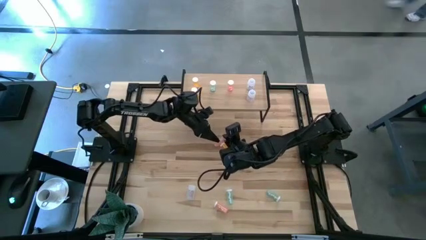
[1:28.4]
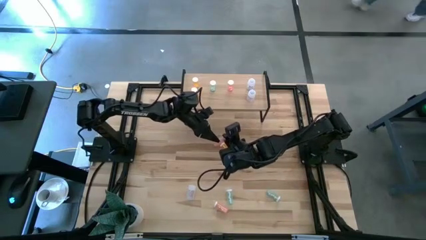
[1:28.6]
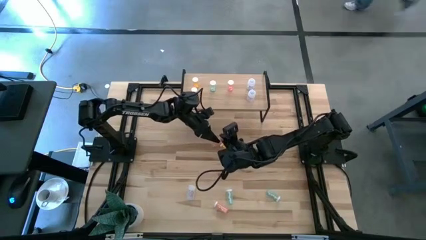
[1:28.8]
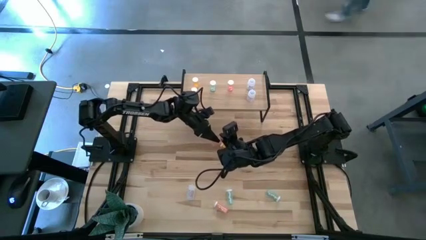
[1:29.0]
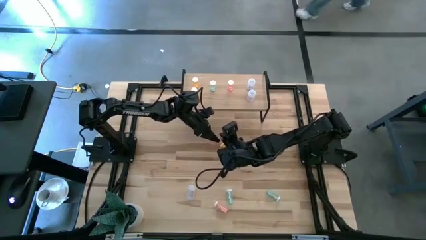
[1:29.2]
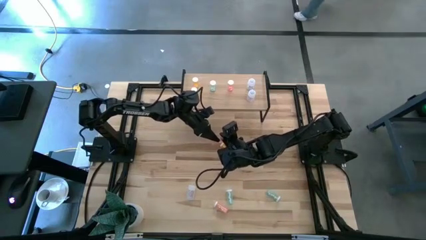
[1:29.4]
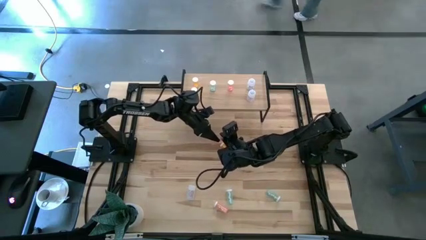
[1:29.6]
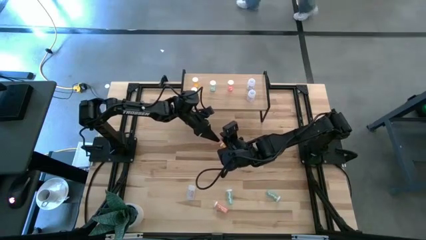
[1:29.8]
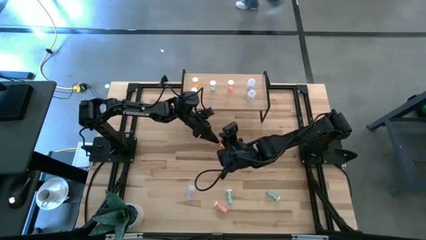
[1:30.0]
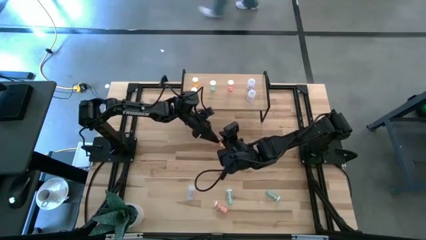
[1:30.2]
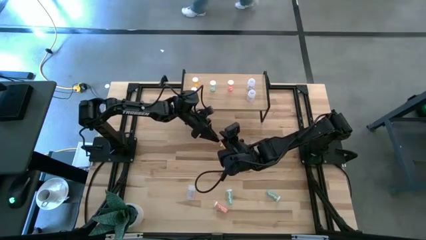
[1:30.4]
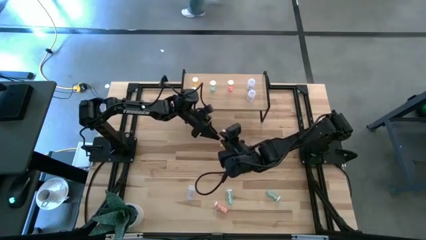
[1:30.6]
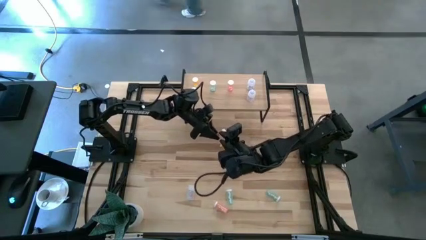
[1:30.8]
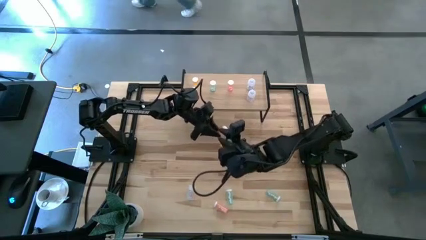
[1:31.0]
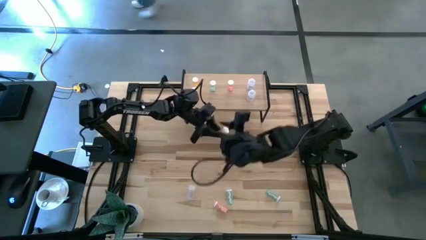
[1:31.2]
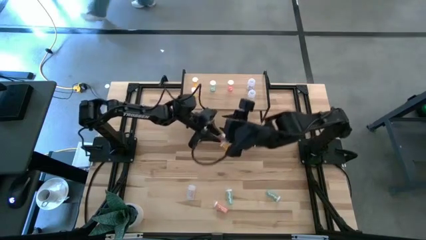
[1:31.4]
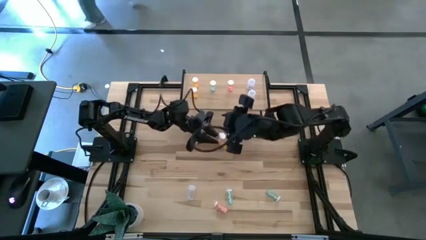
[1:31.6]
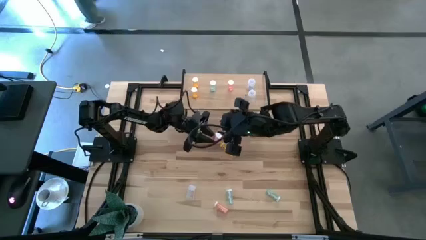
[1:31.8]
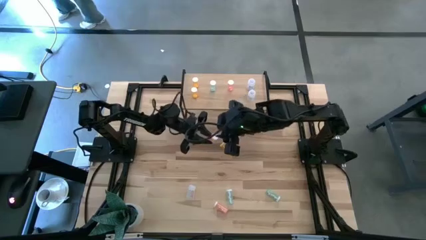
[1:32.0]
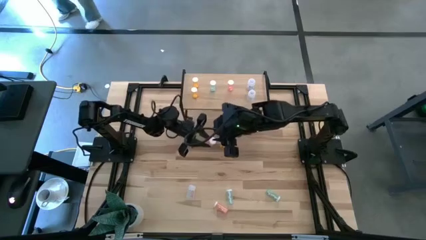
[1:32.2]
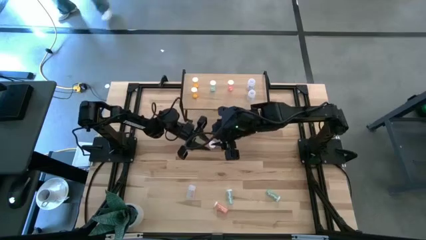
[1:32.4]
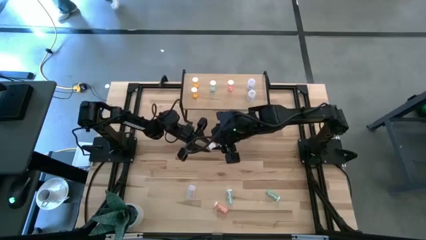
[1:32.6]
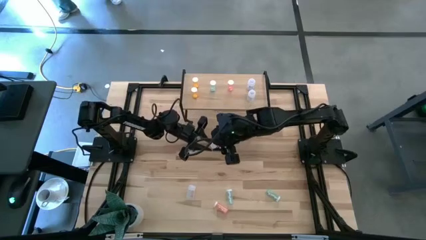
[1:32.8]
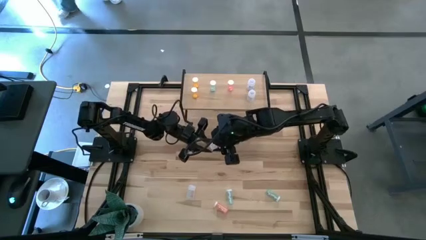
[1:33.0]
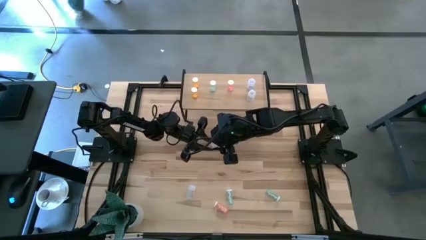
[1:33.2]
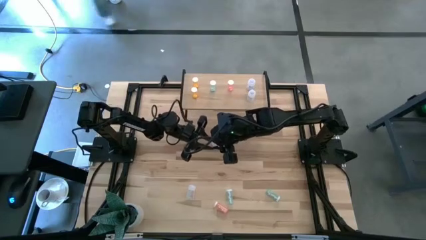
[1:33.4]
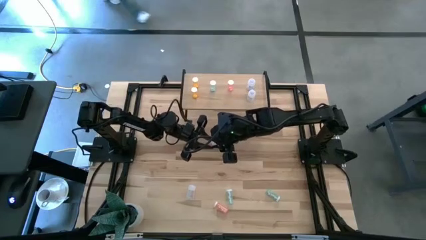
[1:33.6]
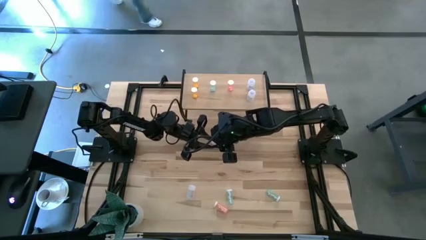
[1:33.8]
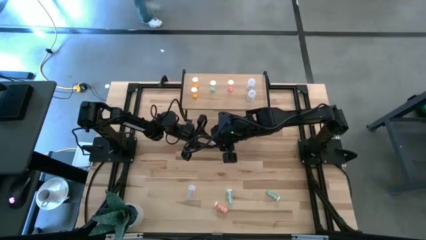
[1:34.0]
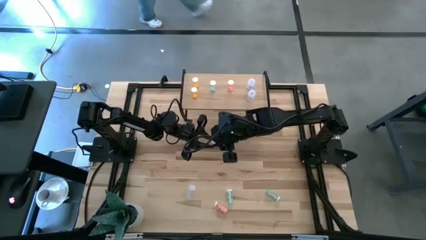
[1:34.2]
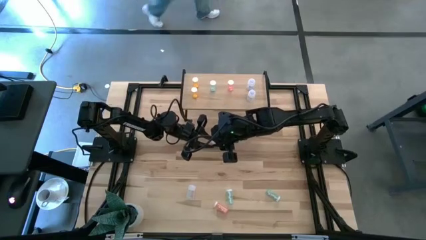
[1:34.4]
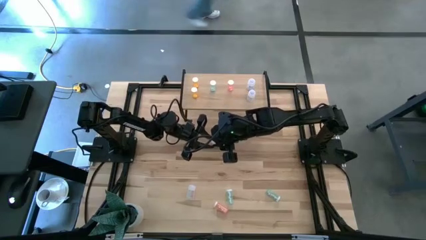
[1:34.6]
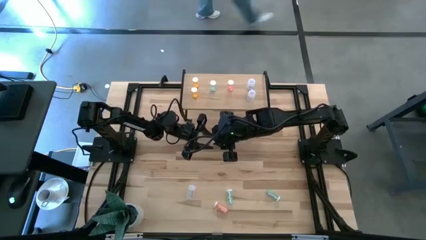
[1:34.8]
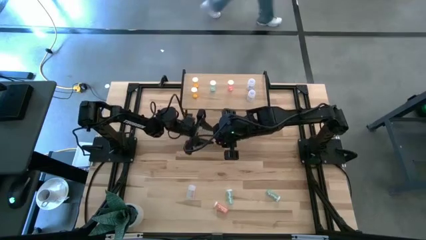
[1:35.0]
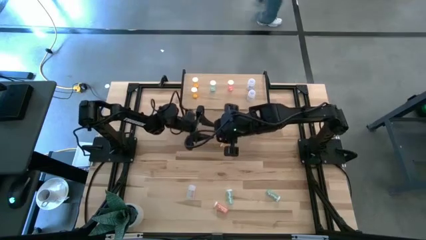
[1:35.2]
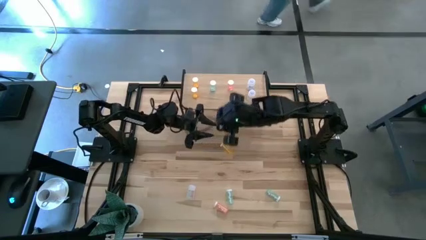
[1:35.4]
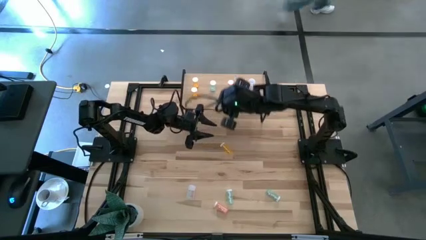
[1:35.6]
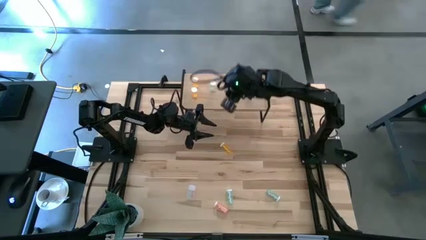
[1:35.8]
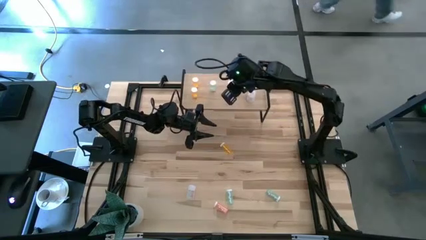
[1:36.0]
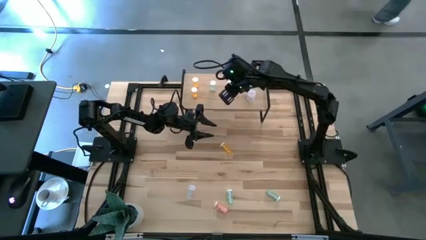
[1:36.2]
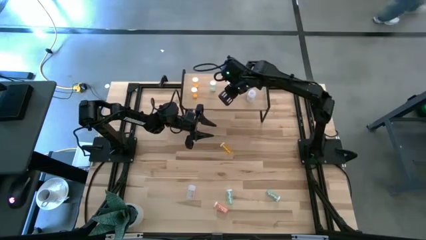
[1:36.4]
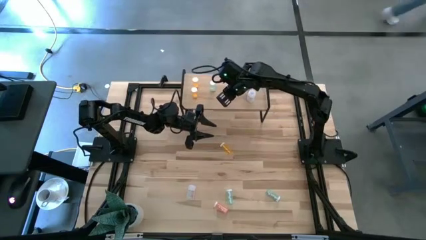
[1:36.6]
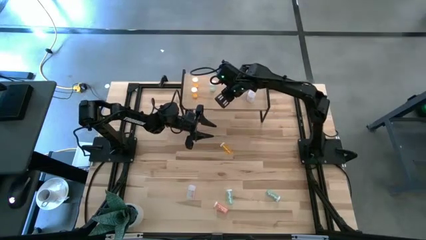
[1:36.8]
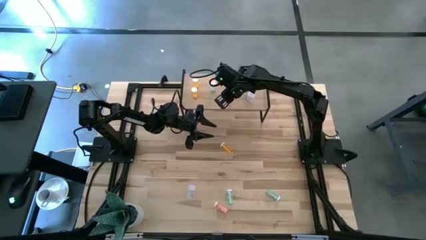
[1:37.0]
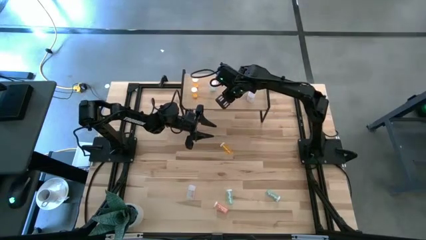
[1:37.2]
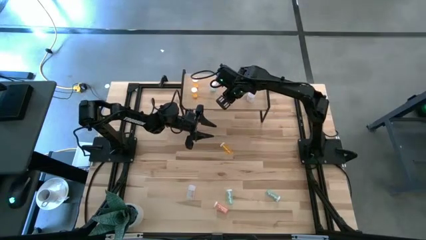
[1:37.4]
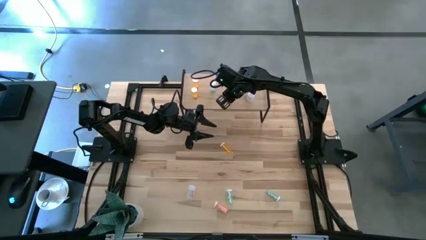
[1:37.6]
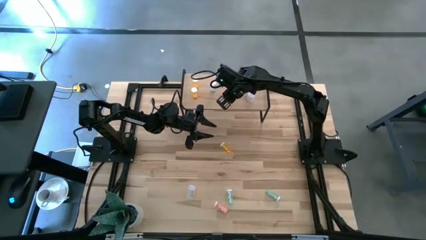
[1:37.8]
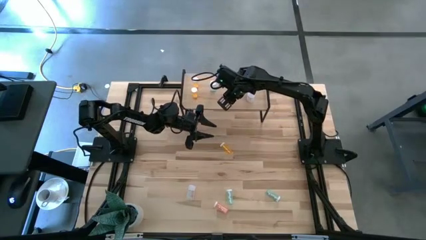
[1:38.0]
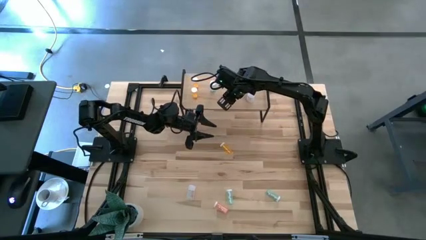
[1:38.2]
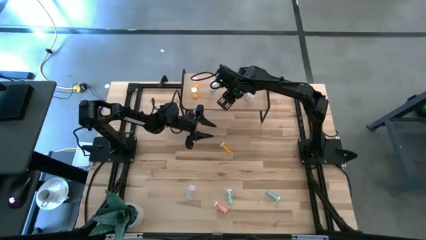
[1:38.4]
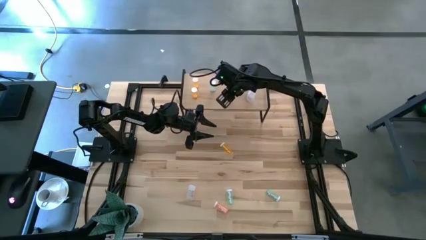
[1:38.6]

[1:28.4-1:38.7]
Task: Pick and place medicine bottles onto shelf by color
Put the pink pill bottle on the shelf aligned with the pink pill bottle

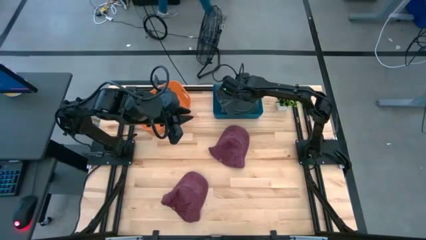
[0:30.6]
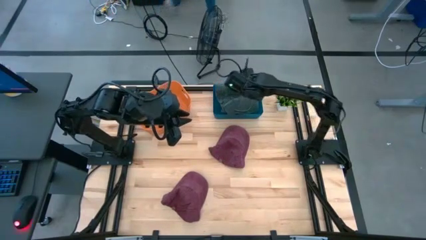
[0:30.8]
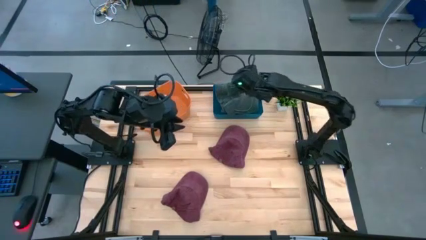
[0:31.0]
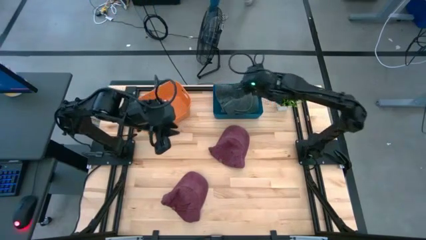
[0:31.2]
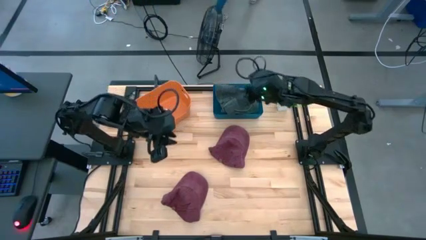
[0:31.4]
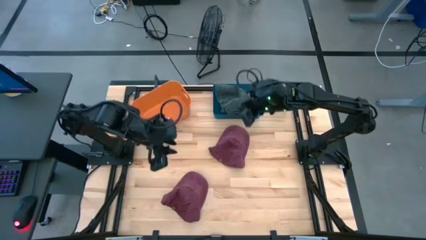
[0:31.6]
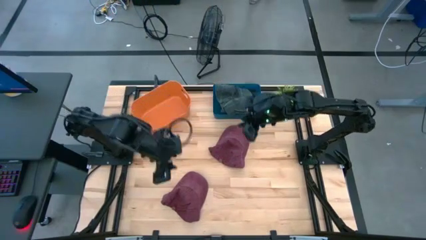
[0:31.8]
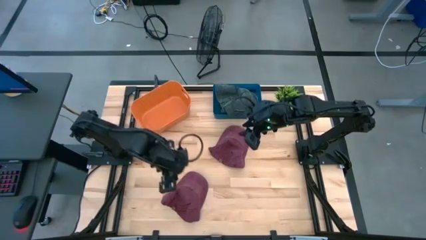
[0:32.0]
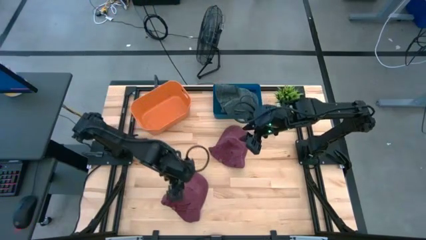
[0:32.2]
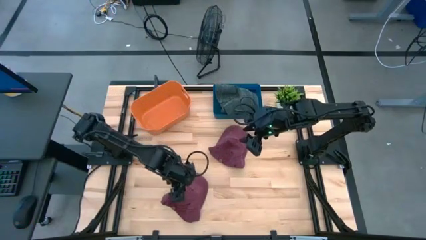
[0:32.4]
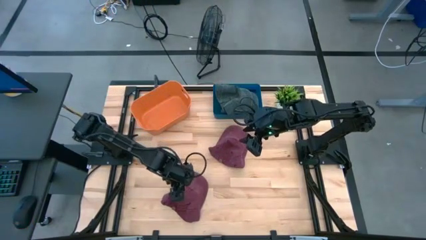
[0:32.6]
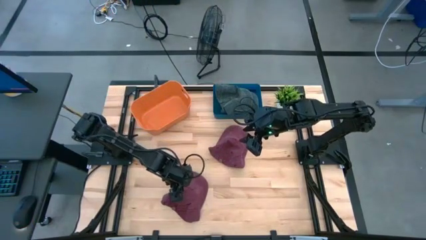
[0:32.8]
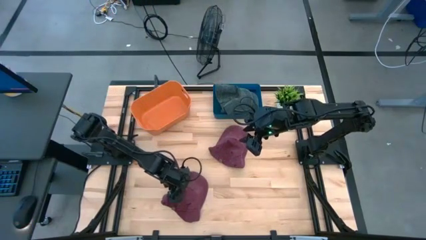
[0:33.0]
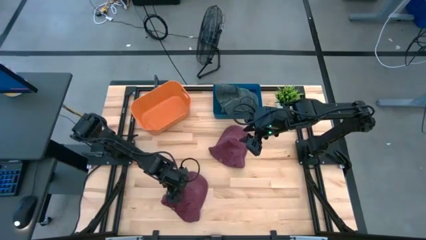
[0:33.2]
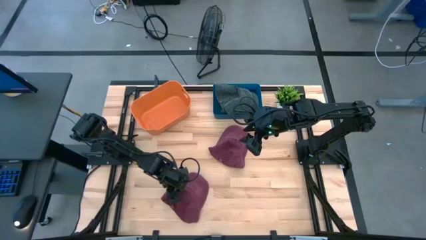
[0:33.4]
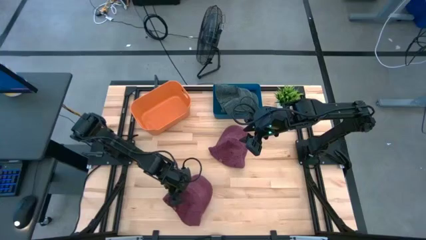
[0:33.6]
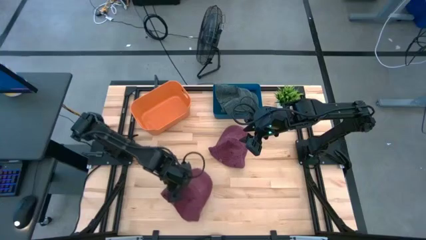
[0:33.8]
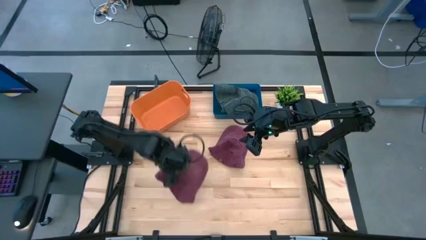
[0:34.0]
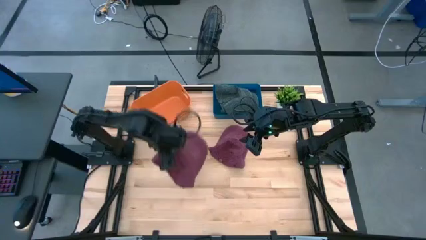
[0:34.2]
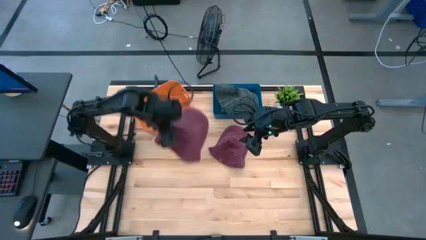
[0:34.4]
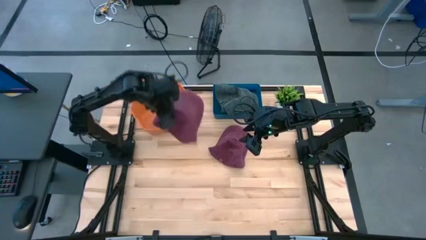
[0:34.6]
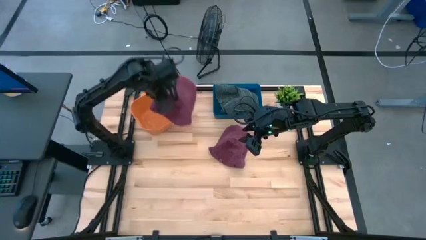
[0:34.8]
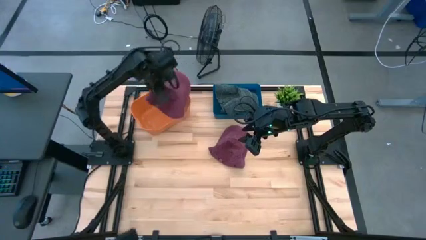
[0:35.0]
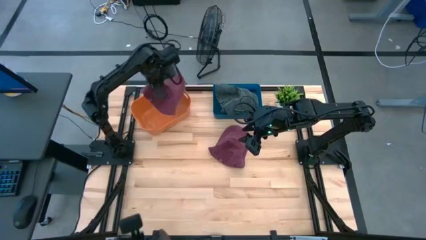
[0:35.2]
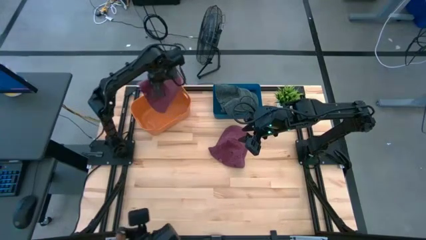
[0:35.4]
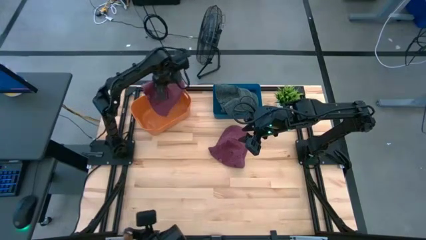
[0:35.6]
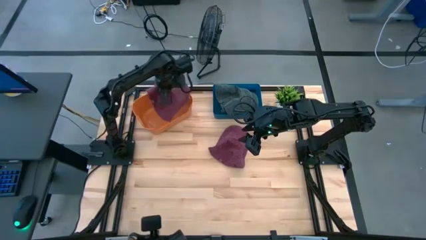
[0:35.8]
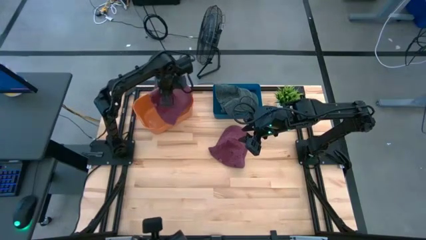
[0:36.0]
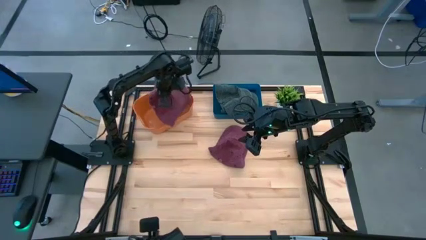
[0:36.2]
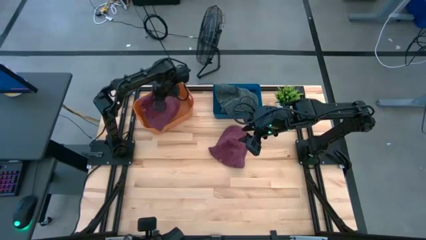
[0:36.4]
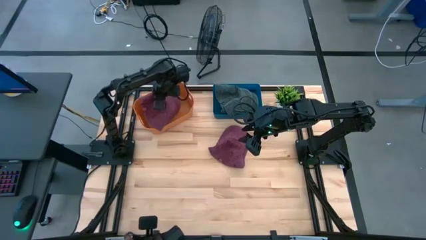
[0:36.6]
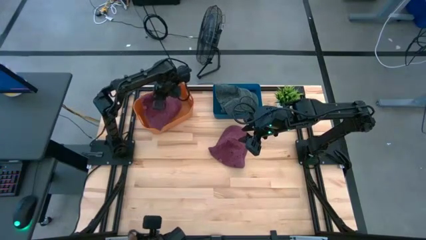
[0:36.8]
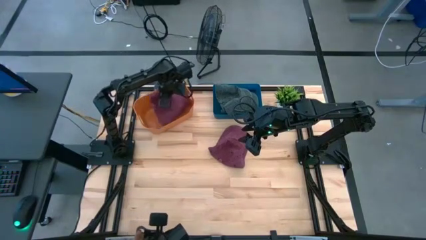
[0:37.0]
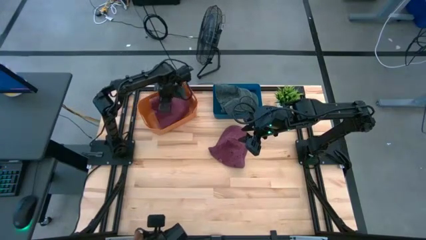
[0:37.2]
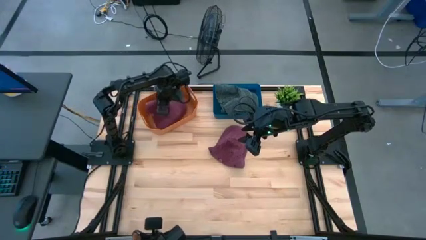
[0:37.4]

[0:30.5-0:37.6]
Task: Pick & Place hat
Put the bottom red cap into the orange bin
